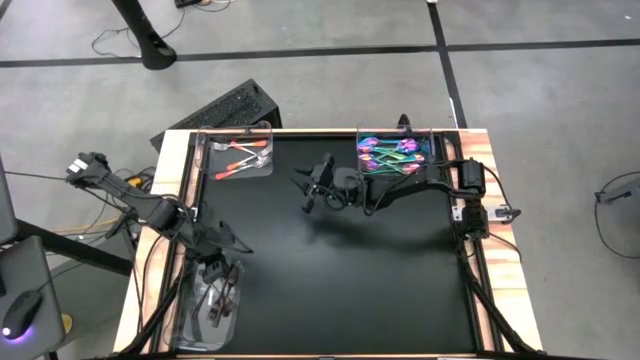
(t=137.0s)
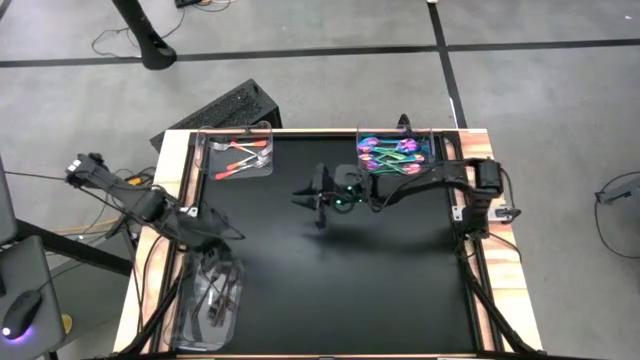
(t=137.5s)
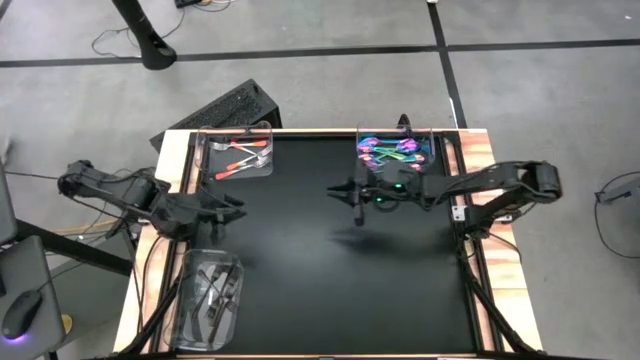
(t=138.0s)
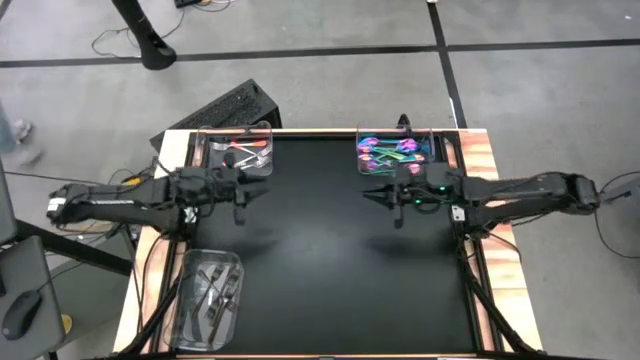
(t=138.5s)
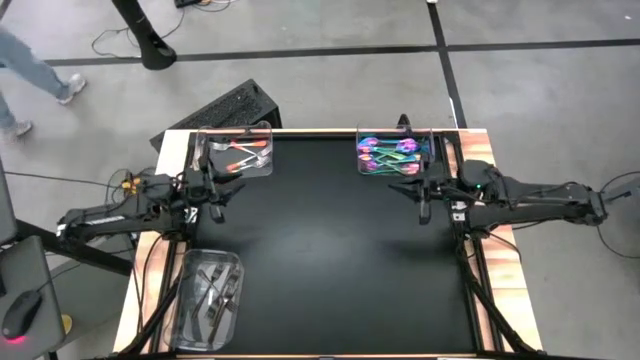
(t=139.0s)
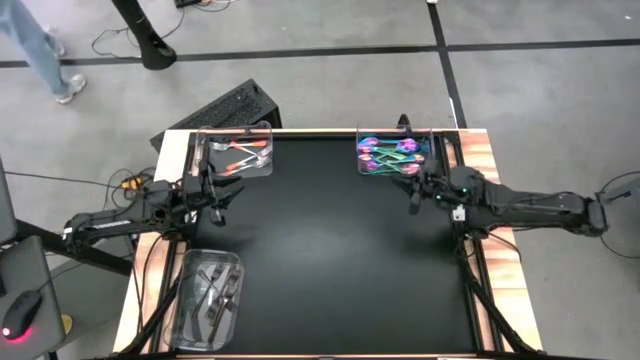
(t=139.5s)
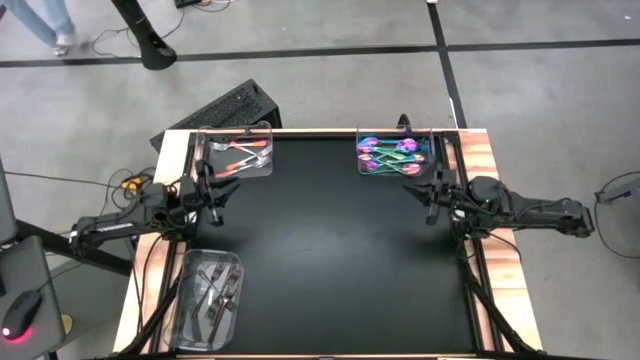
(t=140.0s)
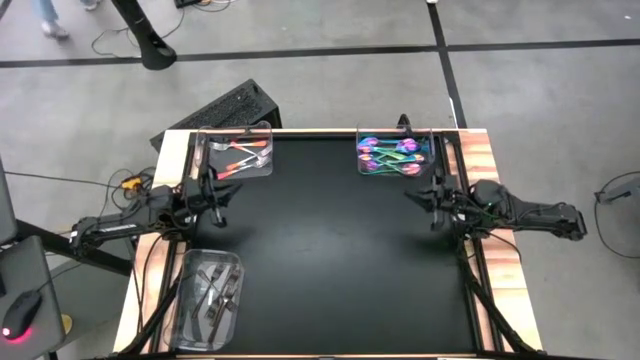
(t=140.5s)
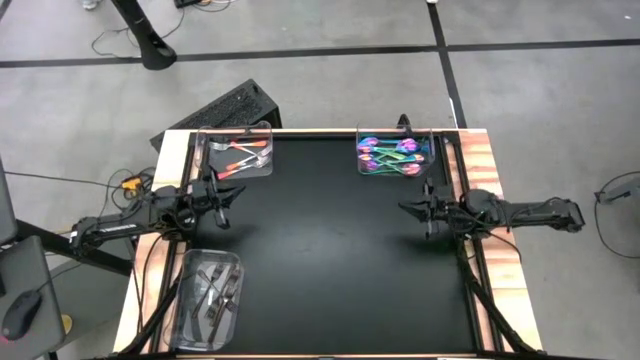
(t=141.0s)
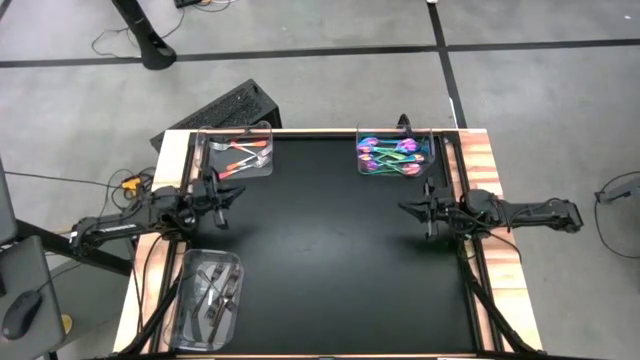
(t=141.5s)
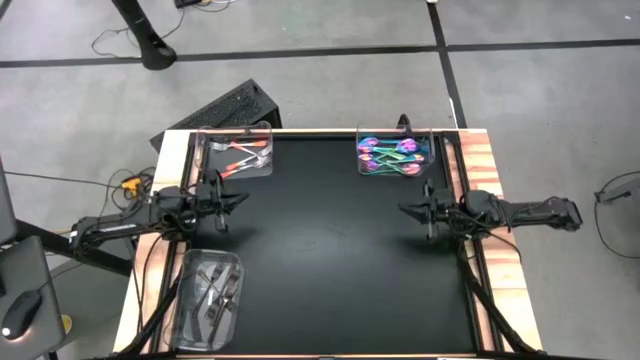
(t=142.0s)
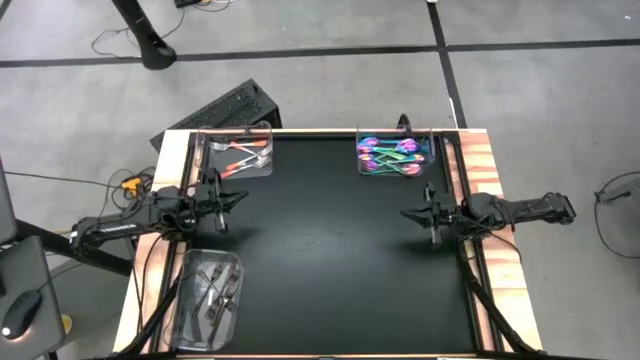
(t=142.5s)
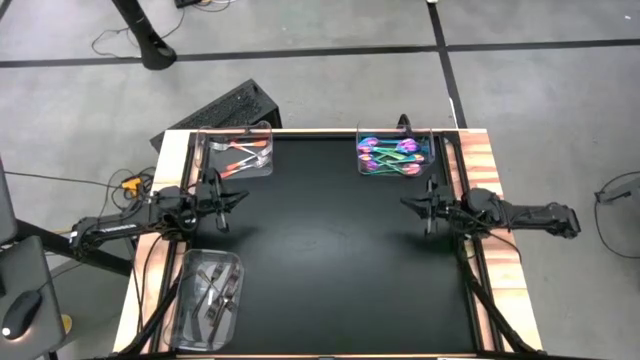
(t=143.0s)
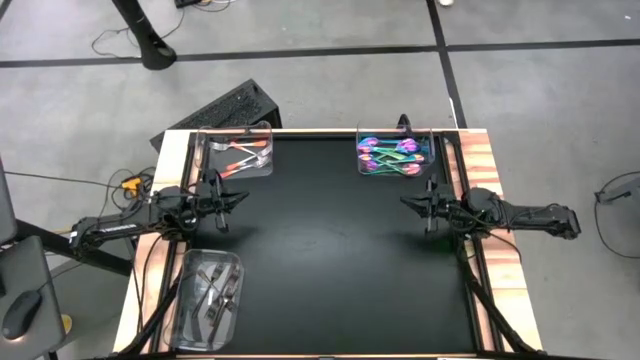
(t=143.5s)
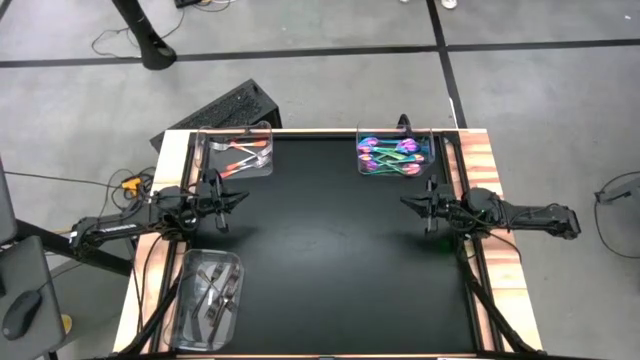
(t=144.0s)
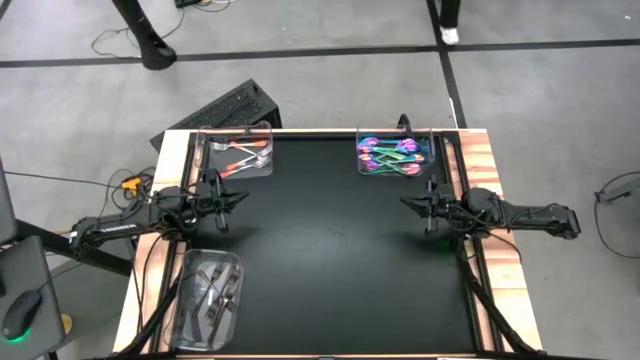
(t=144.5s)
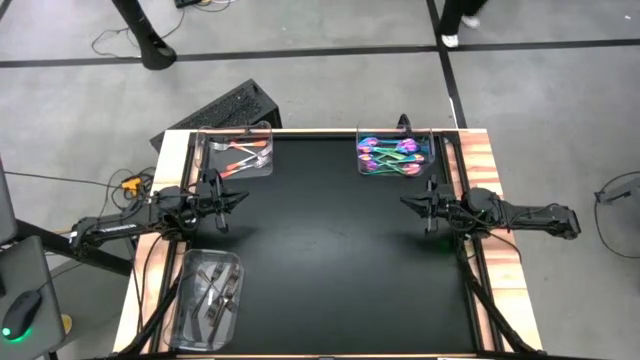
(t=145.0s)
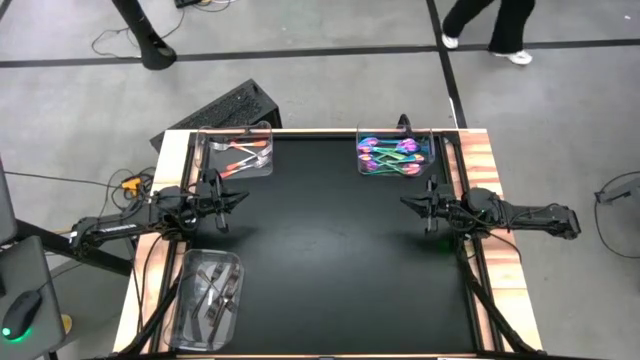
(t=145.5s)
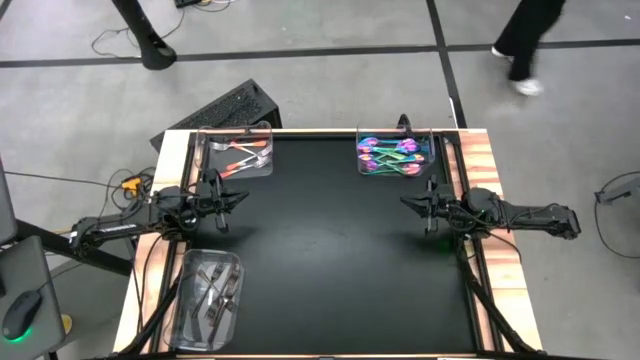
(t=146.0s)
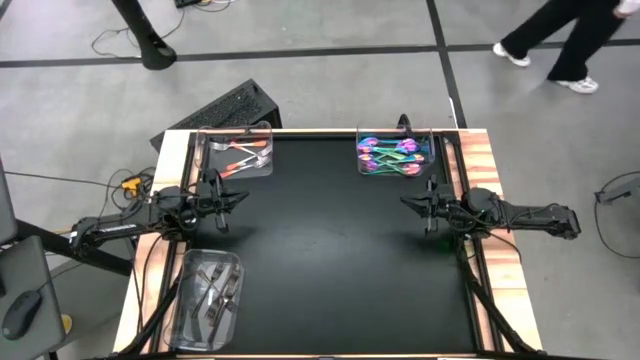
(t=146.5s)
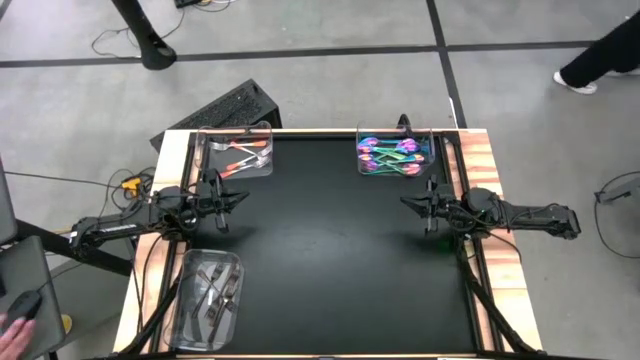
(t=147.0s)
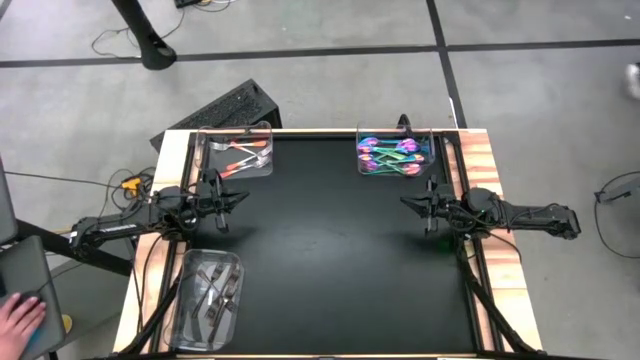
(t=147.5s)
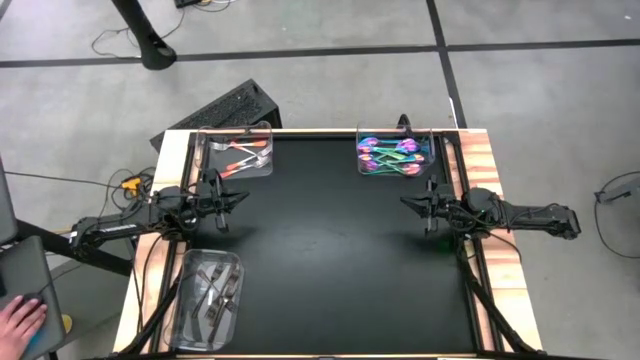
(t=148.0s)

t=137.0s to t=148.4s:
Task: Sort silverware by color (type)
Return to Home Position

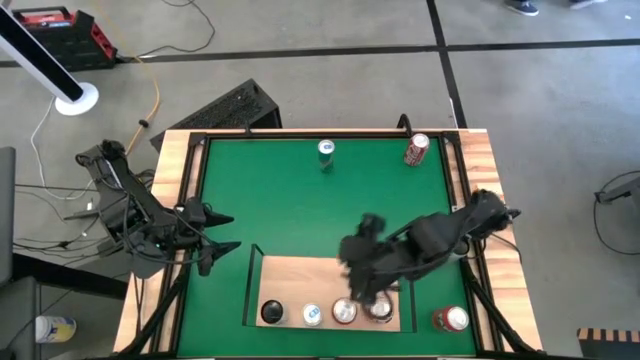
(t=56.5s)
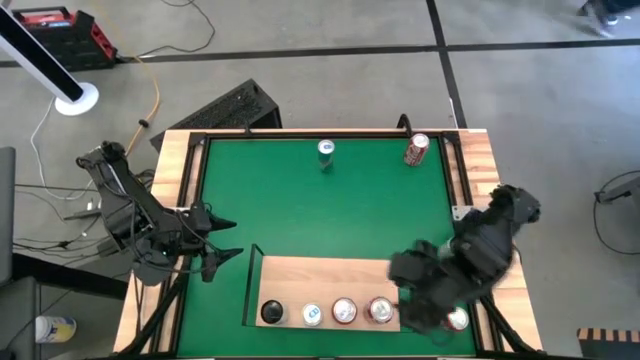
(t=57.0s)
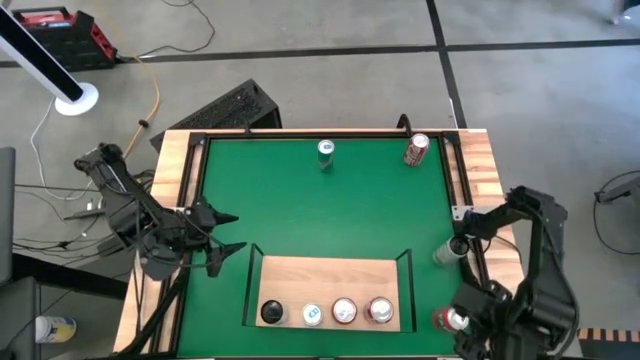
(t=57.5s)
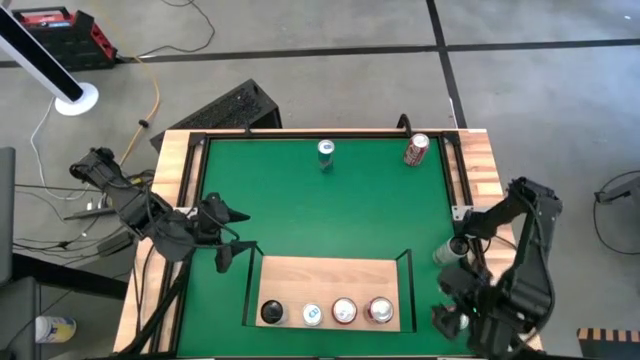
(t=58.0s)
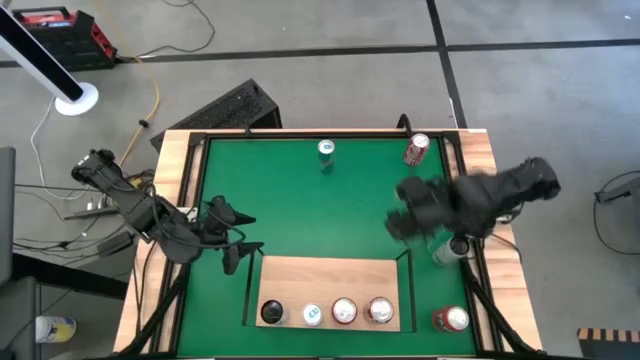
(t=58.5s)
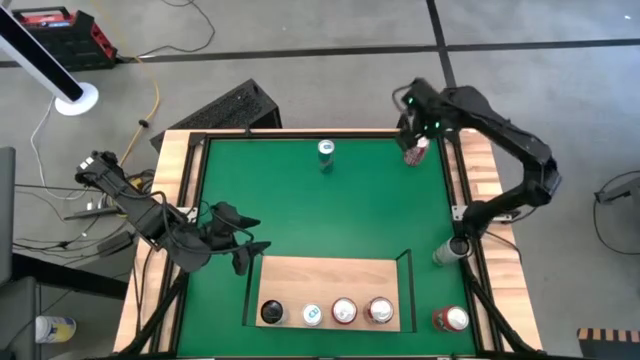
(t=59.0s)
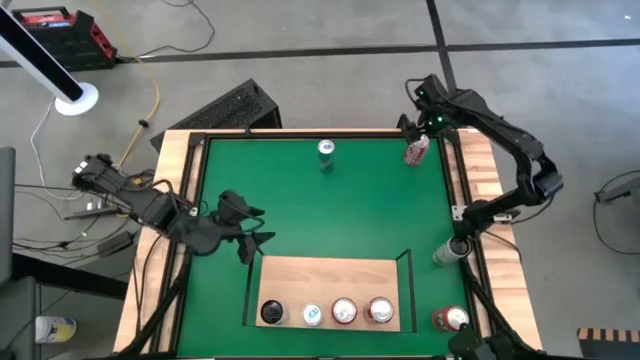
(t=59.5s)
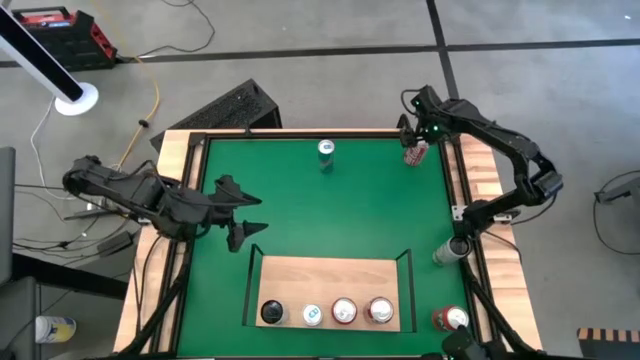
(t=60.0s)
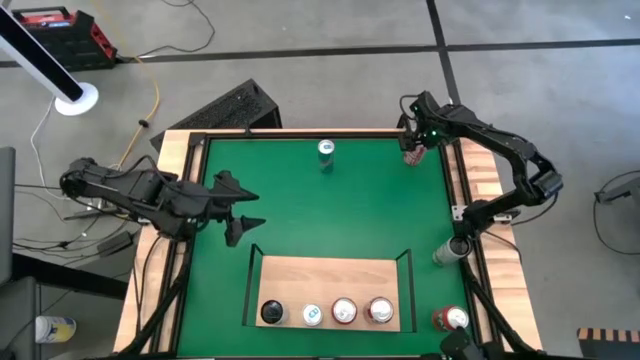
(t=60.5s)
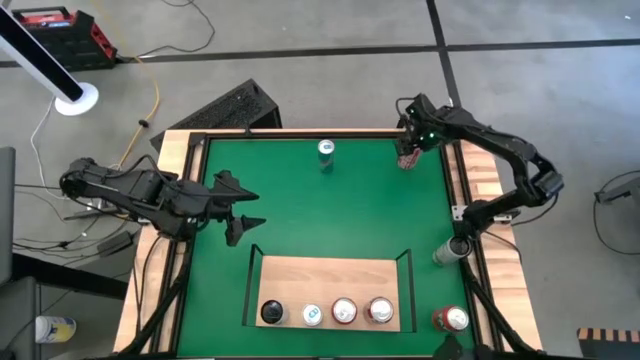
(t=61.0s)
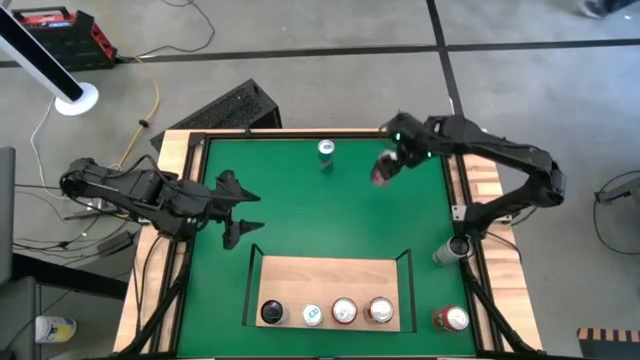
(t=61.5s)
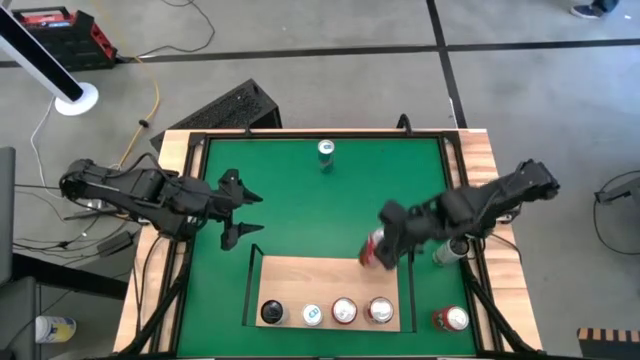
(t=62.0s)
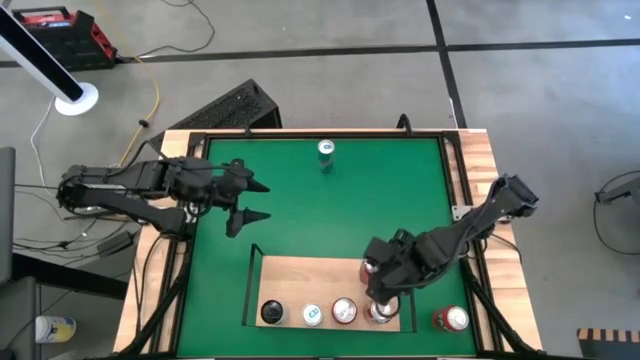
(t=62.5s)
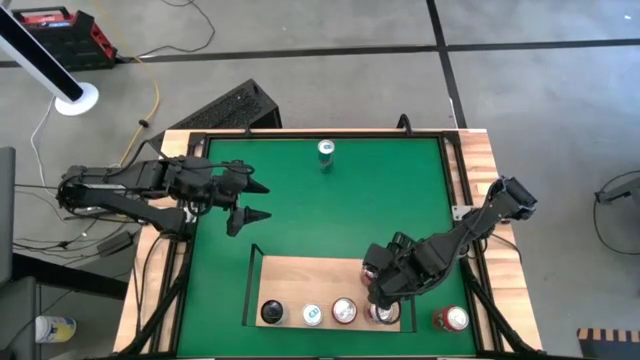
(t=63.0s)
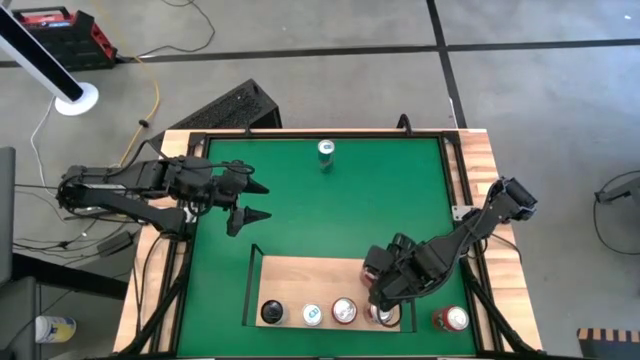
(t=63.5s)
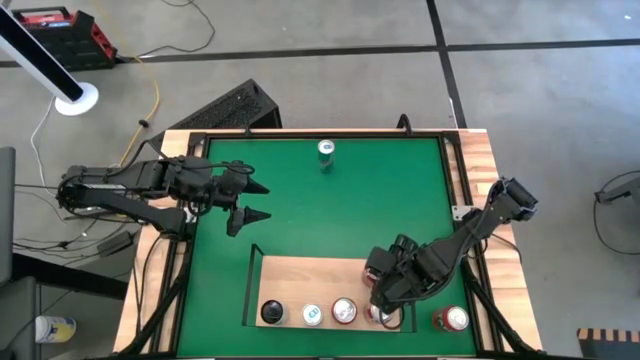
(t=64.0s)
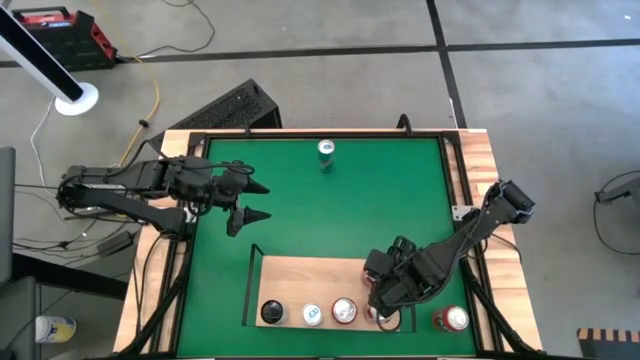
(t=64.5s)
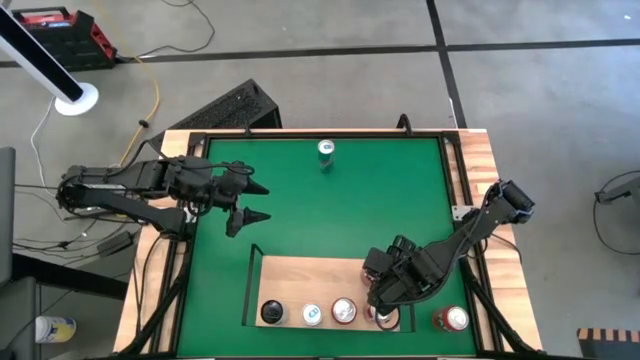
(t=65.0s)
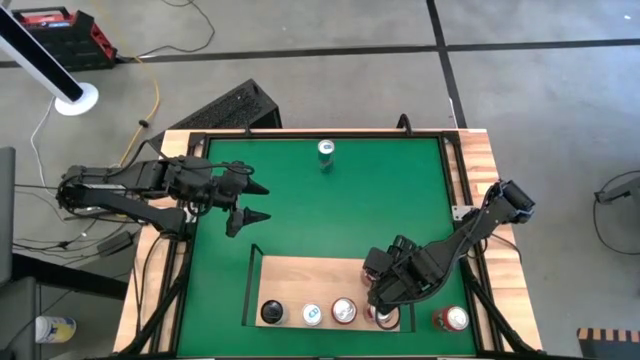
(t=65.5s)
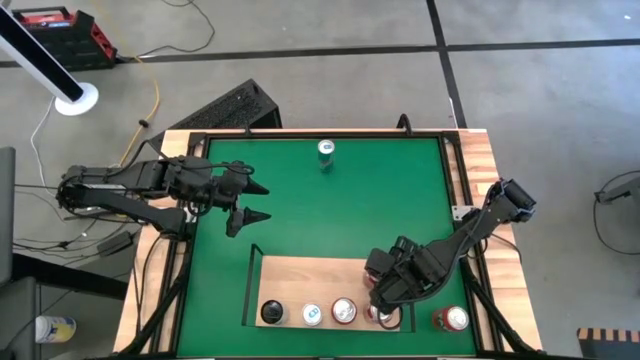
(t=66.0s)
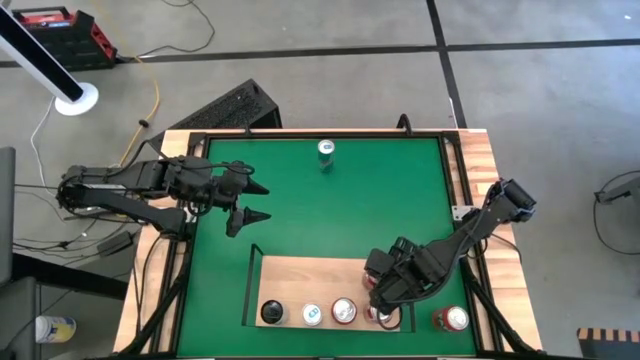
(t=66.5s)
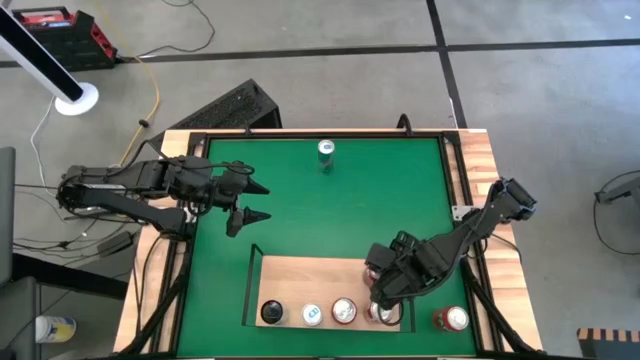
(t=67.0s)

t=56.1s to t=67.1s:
Task: Place canned beverage on shelf
Put the red soda can on the shelf aligned with the other red soda can
